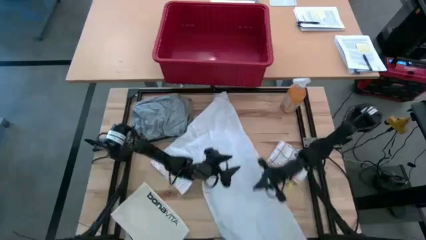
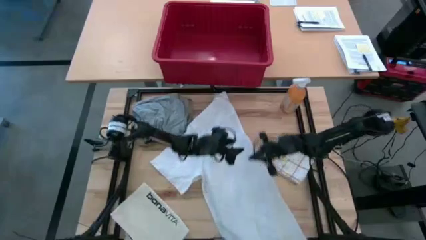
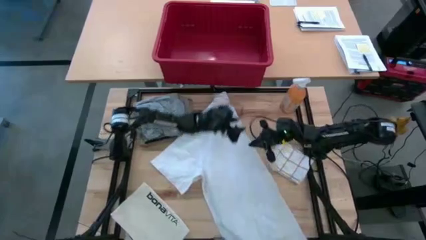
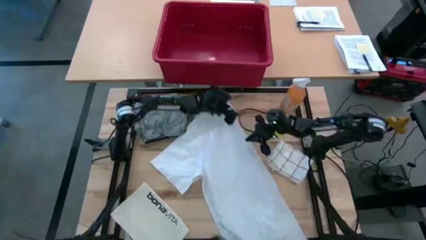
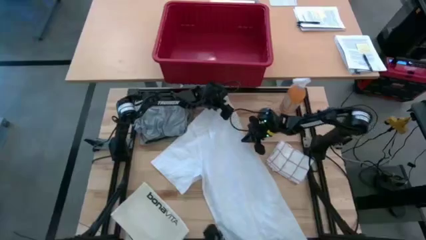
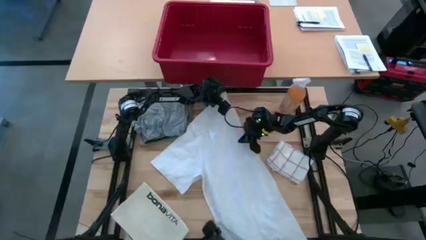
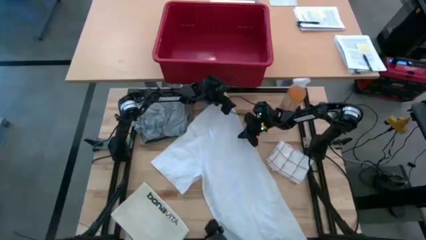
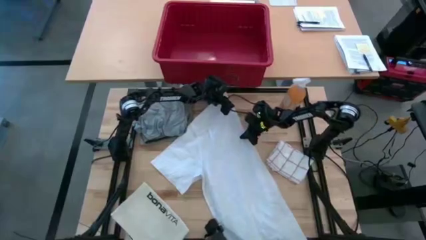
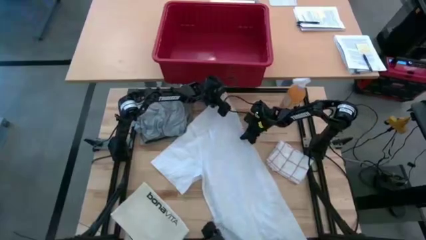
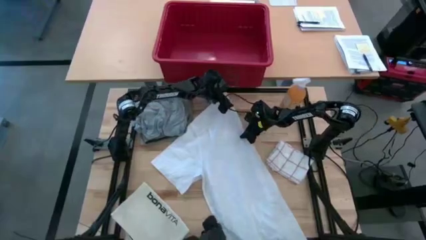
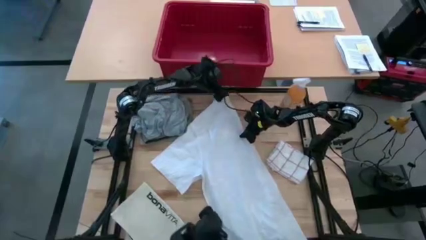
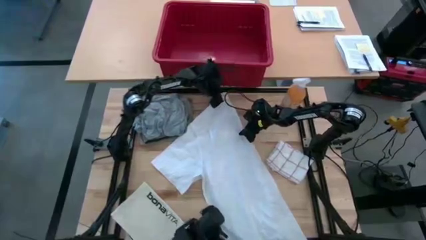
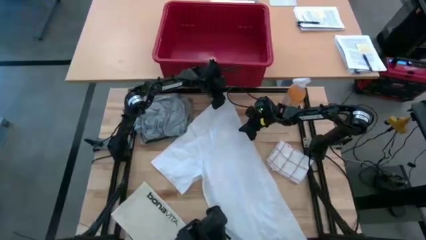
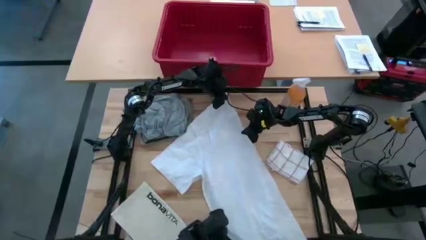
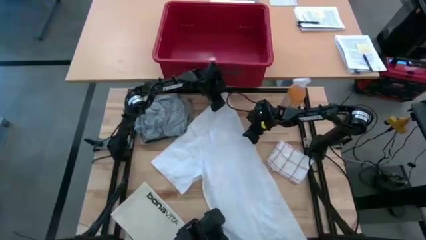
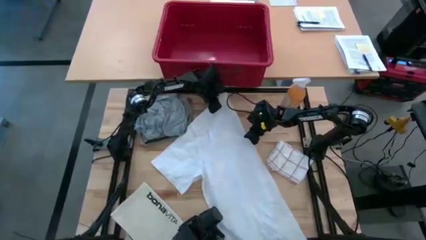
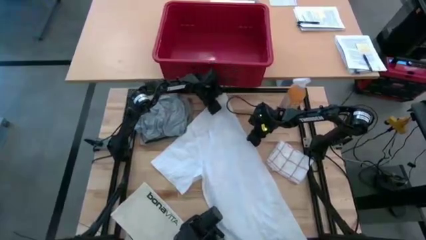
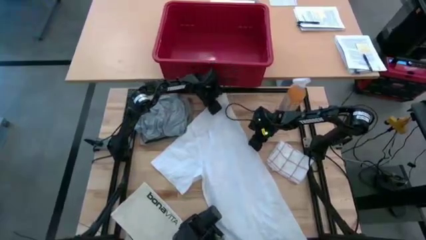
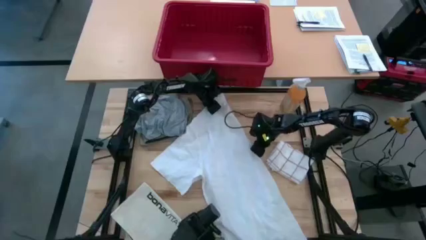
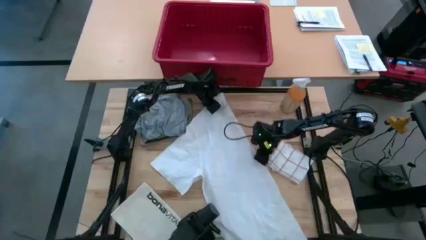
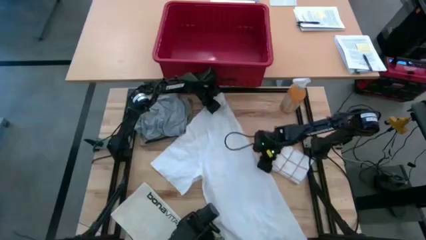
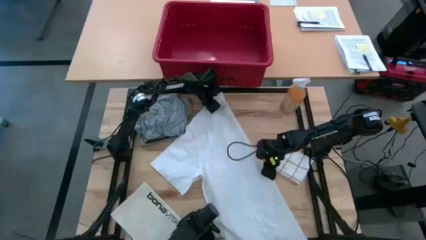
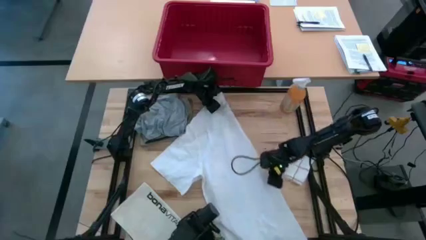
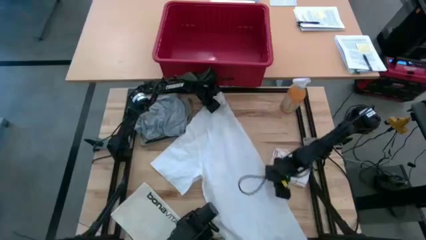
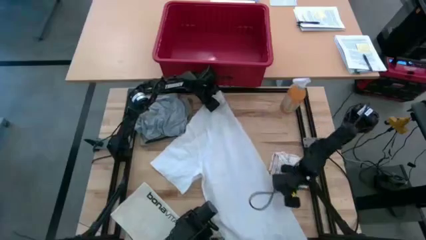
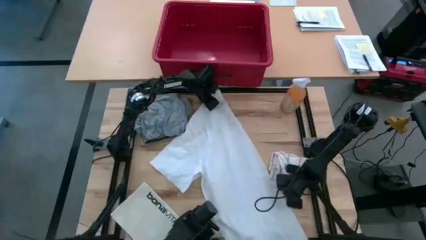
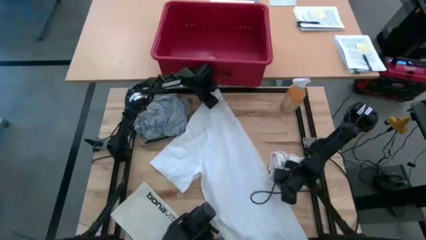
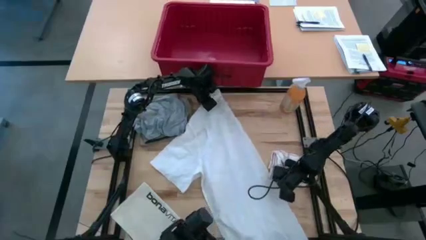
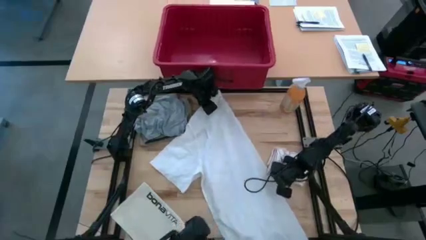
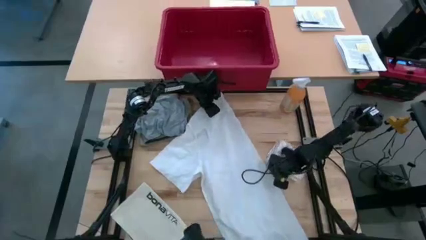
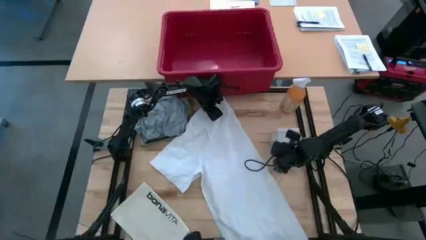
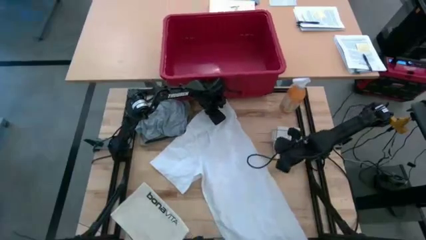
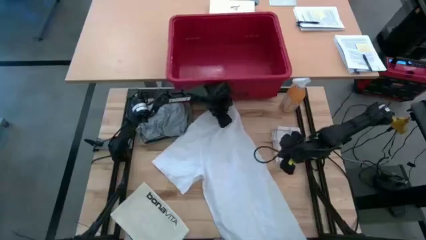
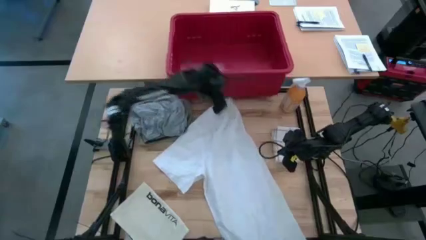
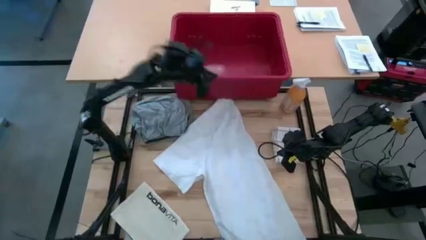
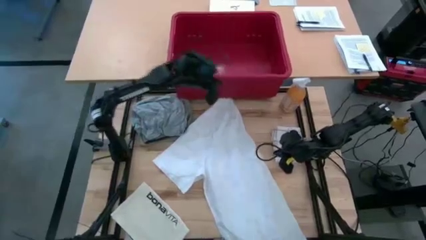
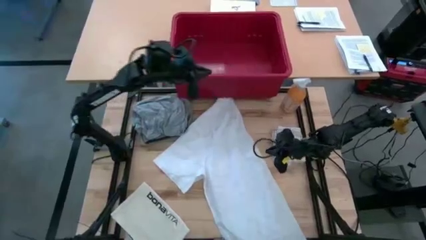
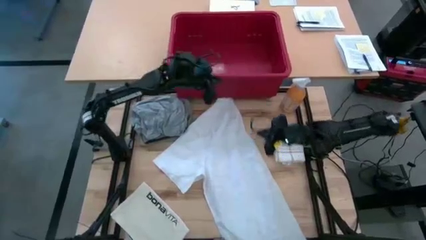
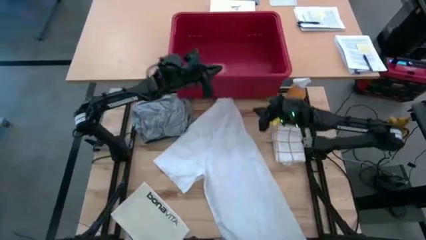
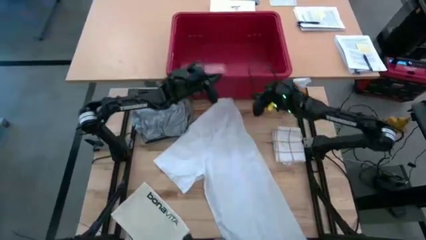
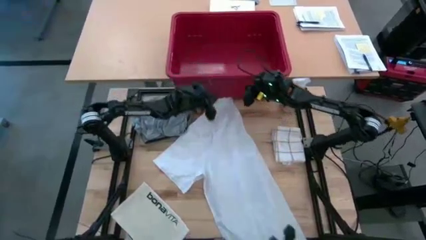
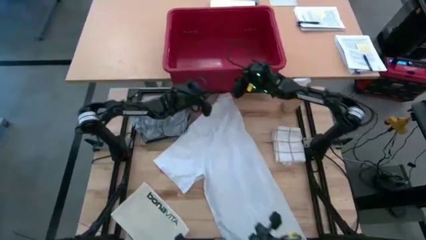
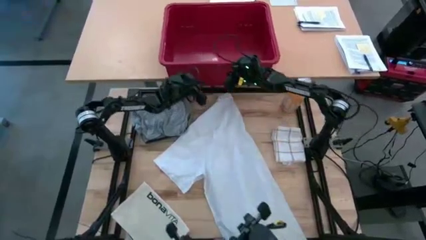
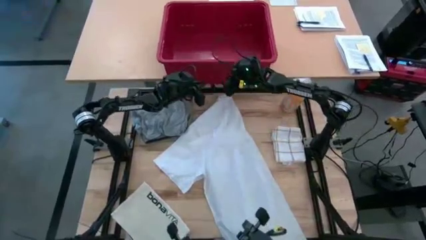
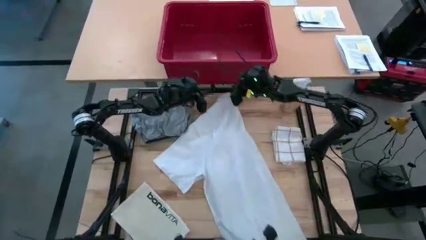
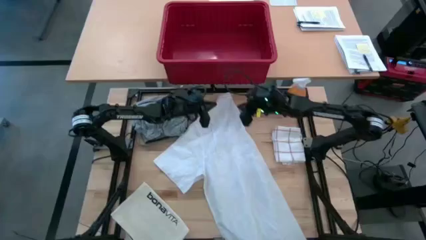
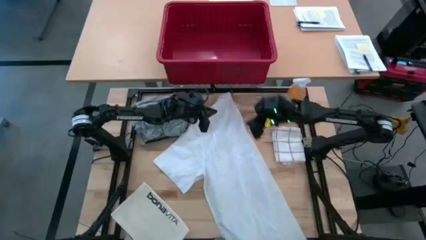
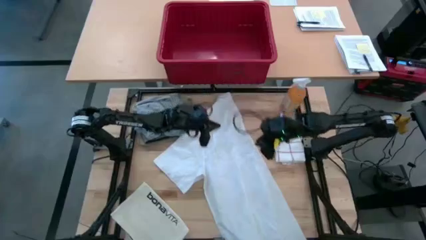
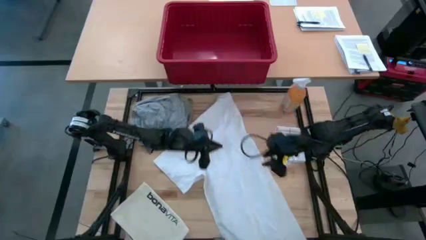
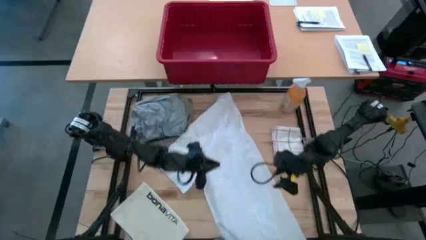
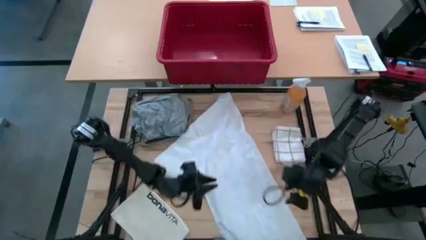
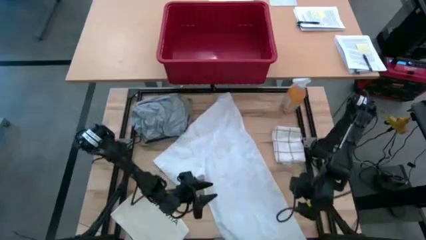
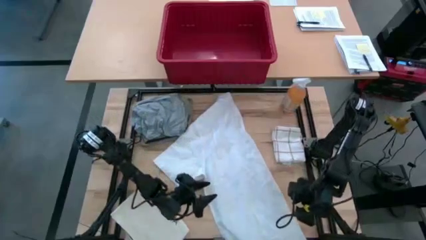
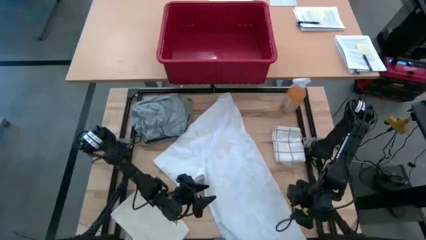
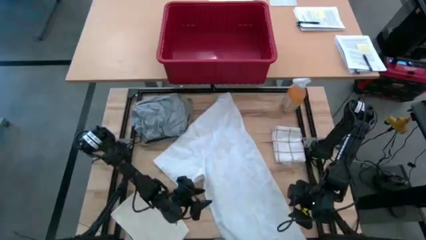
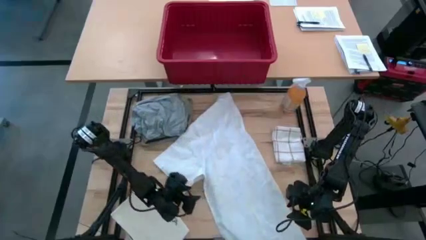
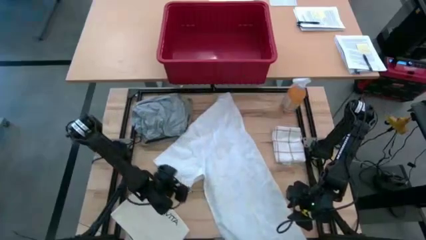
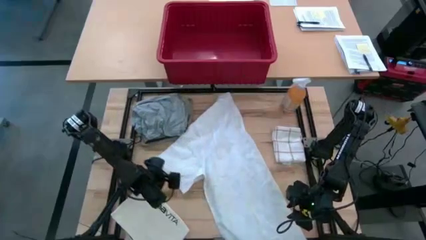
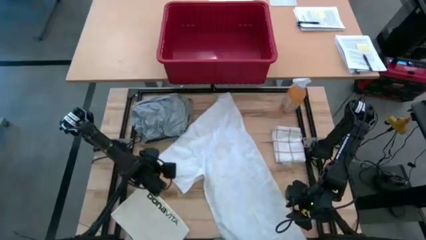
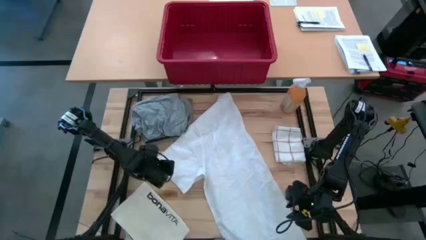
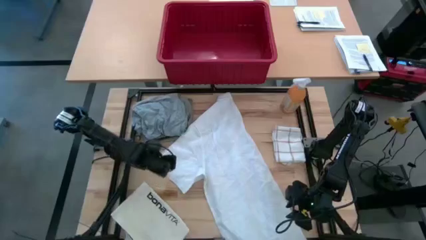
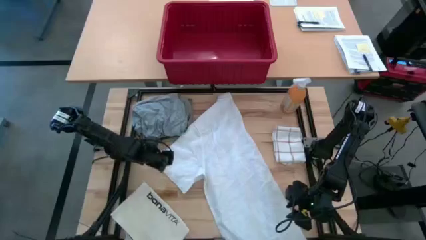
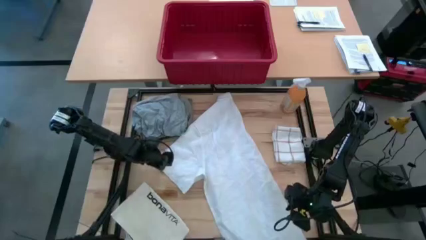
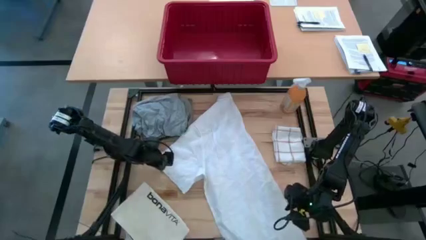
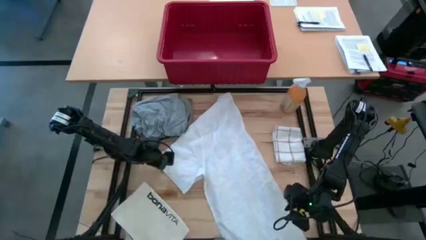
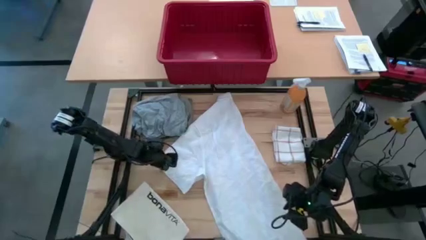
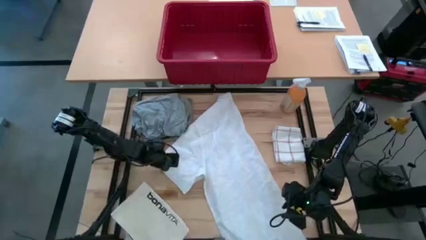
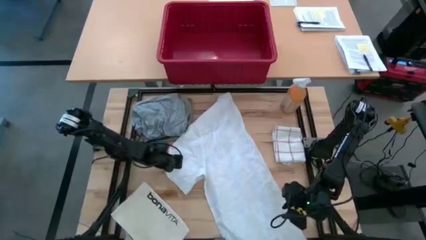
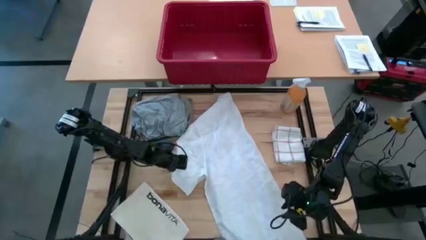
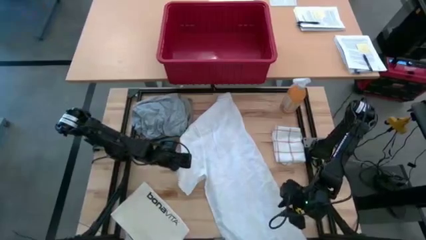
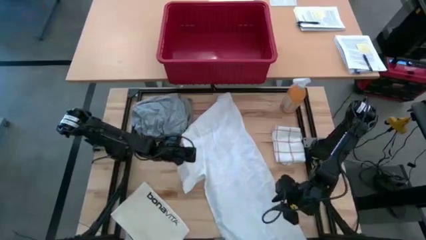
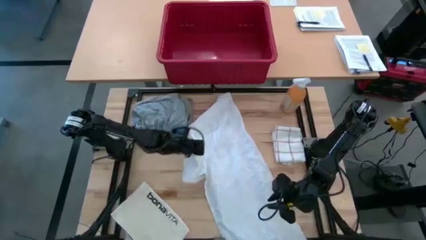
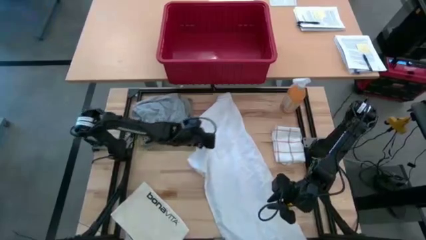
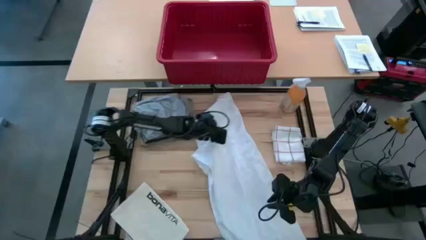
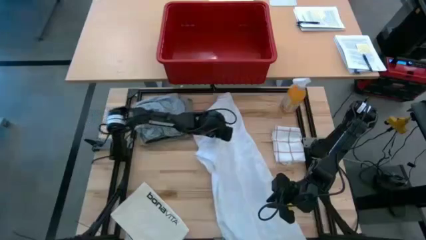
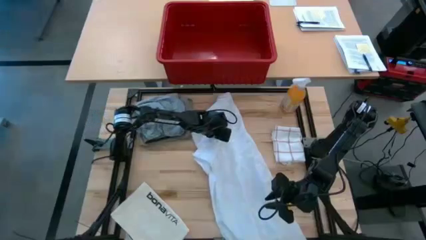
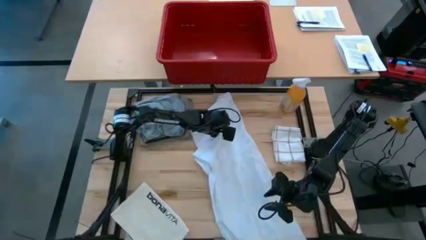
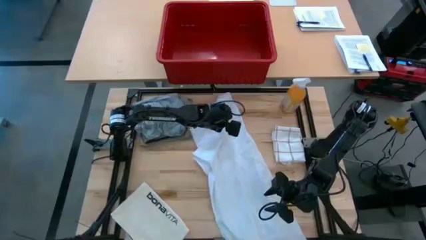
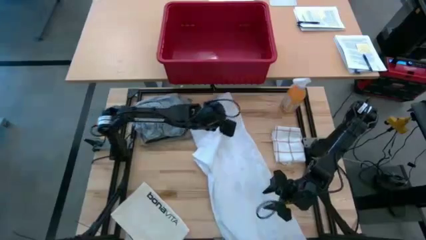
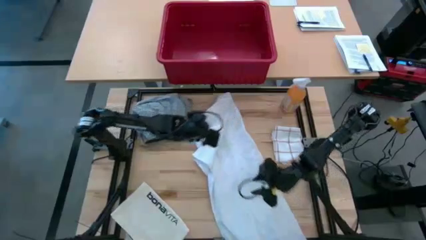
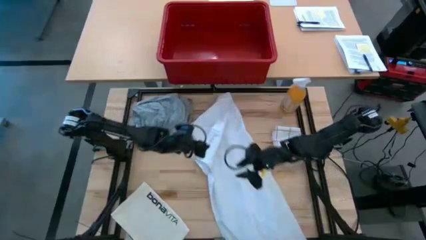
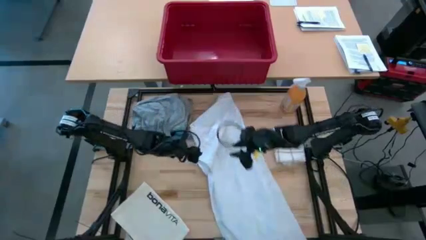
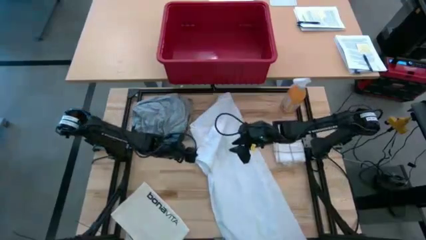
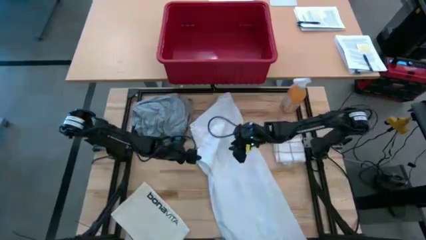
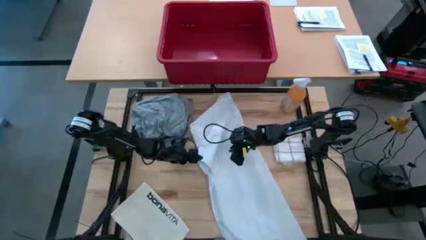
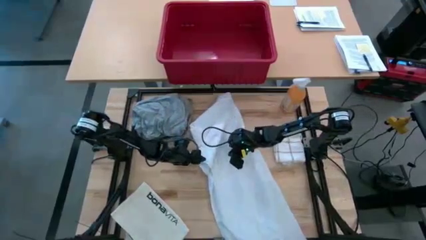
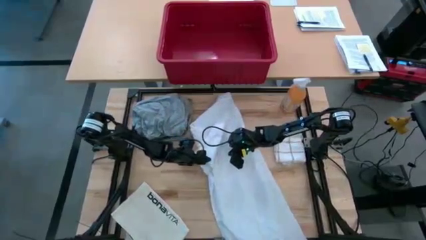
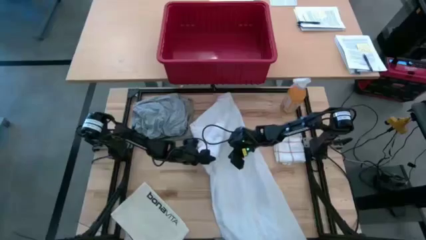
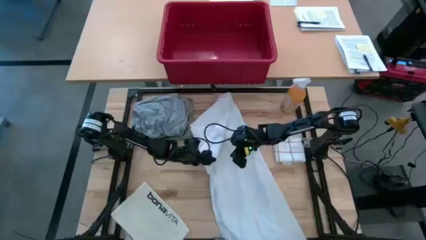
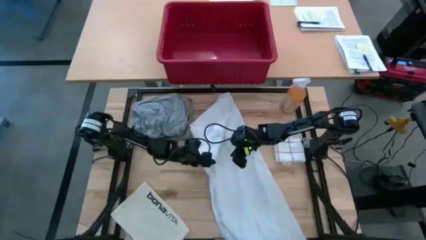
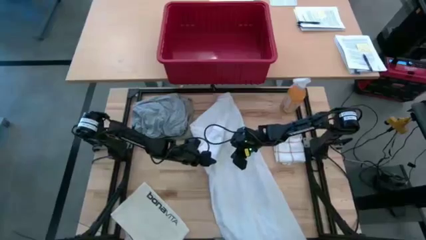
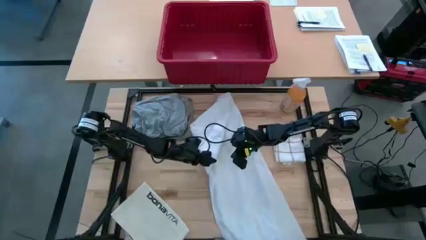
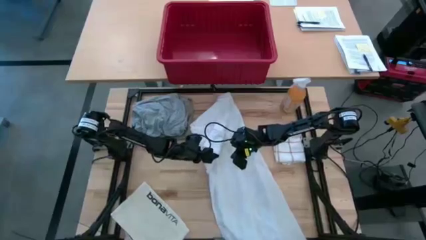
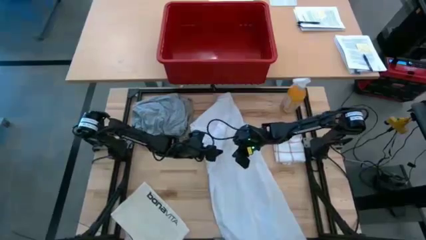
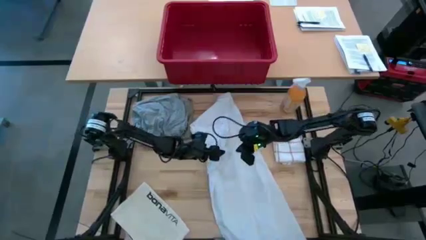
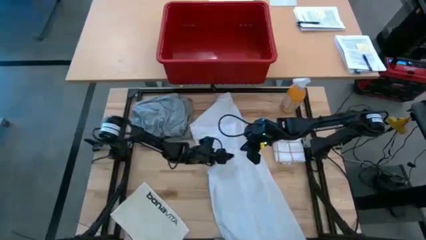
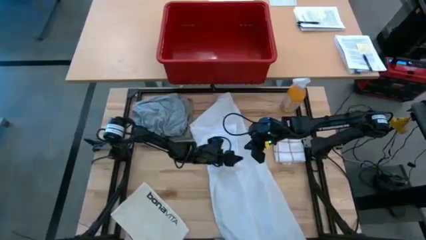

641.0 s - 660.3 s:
Task: Fold laundry
Fold the white long sleeve shirt
